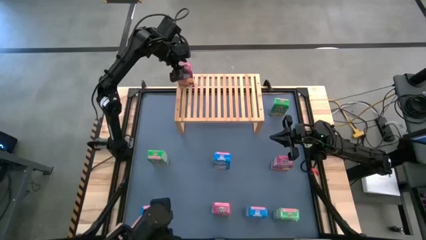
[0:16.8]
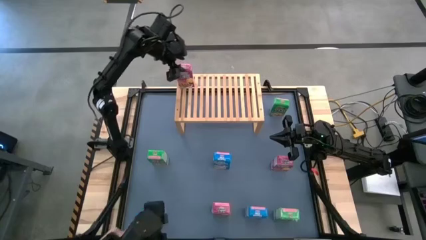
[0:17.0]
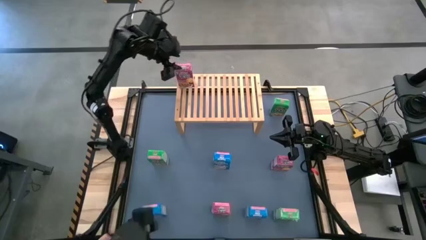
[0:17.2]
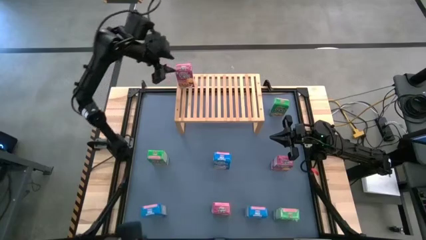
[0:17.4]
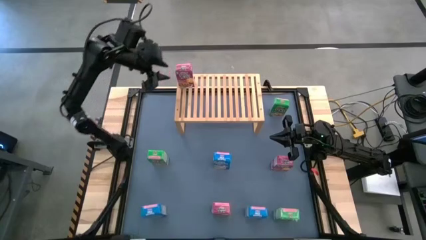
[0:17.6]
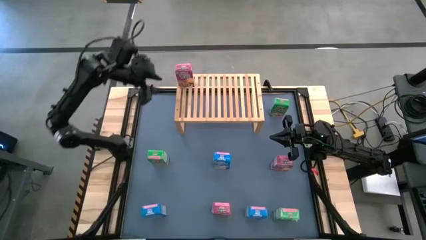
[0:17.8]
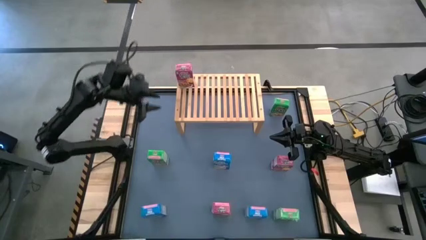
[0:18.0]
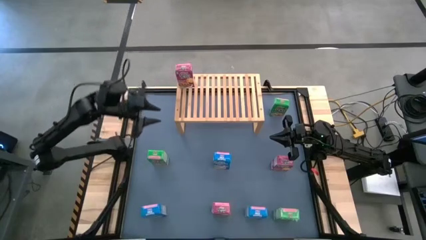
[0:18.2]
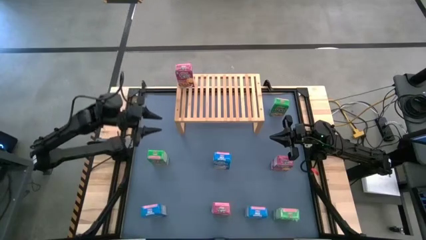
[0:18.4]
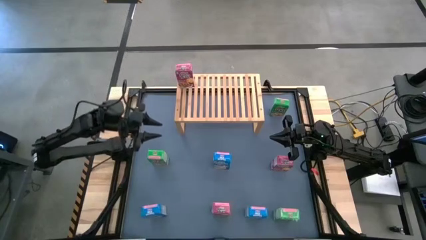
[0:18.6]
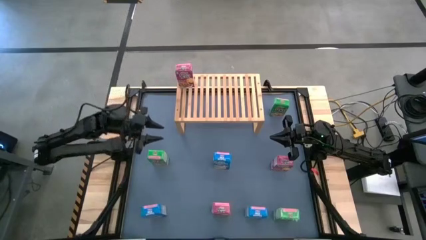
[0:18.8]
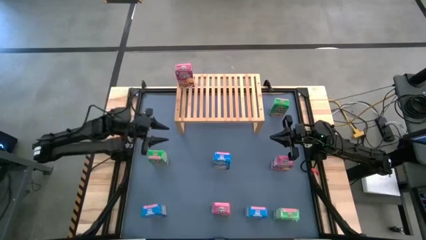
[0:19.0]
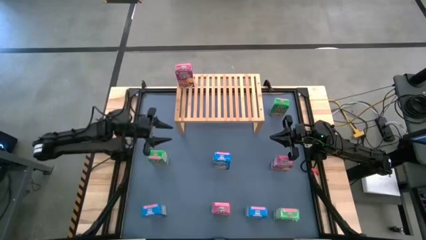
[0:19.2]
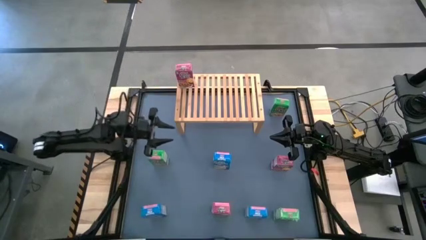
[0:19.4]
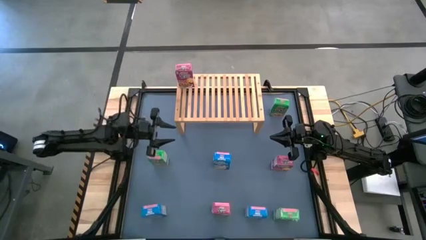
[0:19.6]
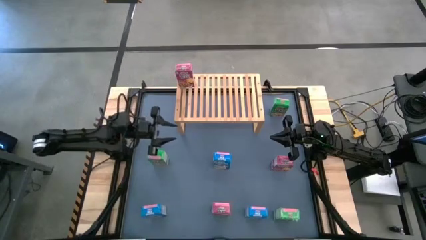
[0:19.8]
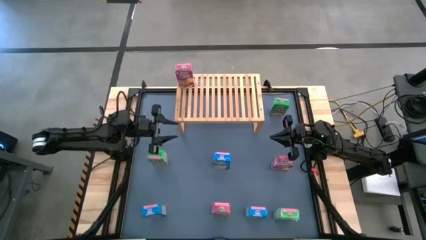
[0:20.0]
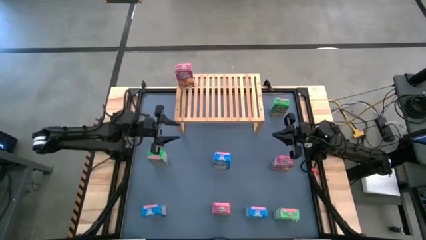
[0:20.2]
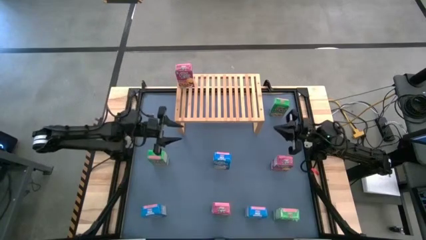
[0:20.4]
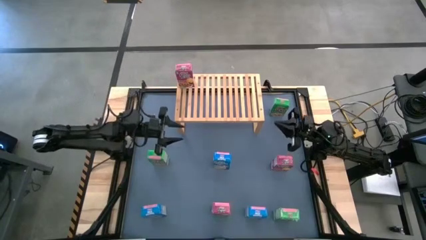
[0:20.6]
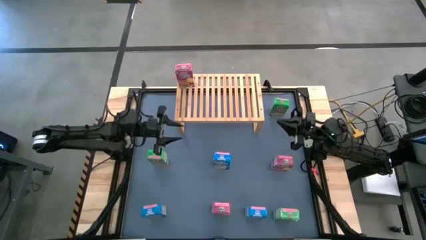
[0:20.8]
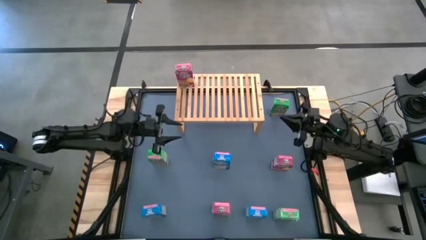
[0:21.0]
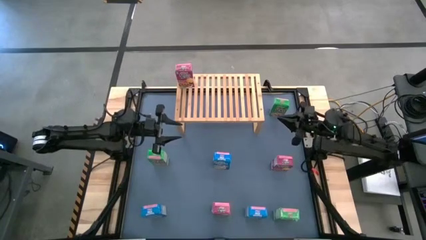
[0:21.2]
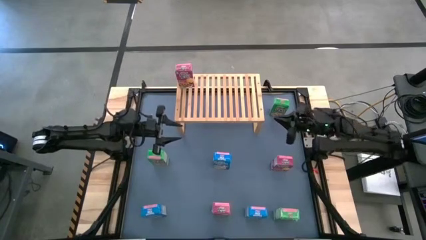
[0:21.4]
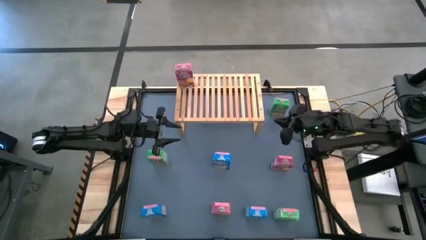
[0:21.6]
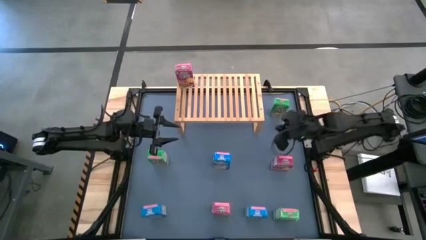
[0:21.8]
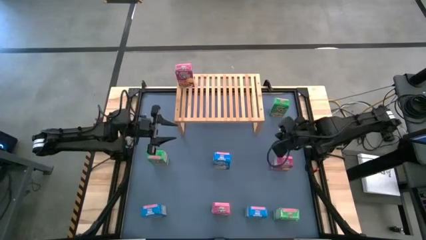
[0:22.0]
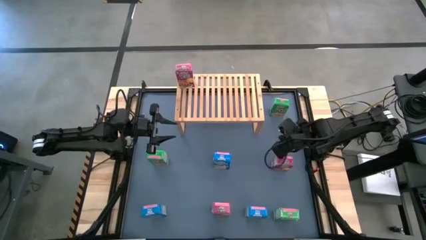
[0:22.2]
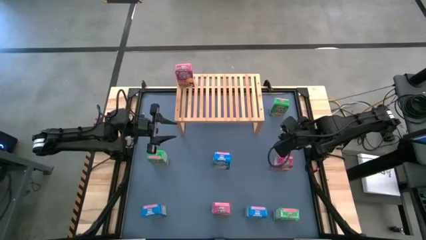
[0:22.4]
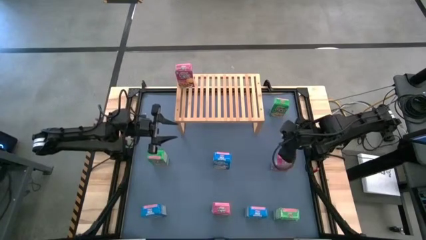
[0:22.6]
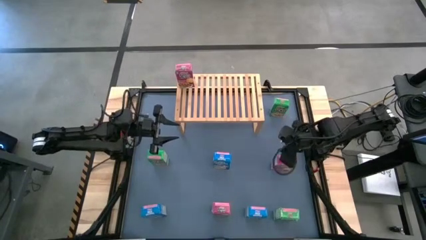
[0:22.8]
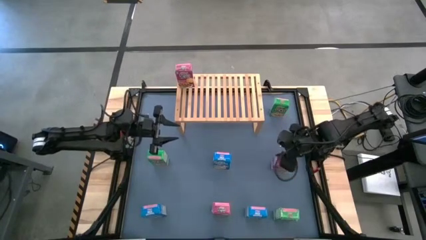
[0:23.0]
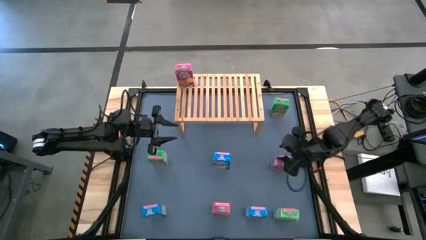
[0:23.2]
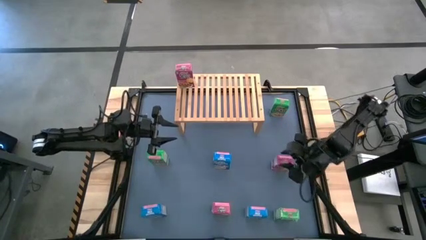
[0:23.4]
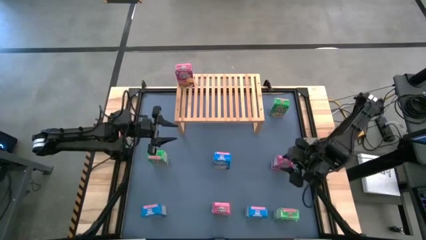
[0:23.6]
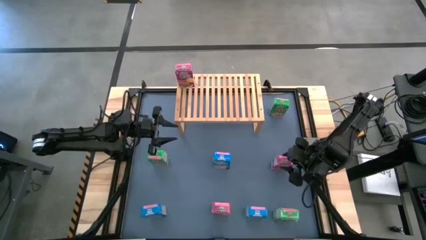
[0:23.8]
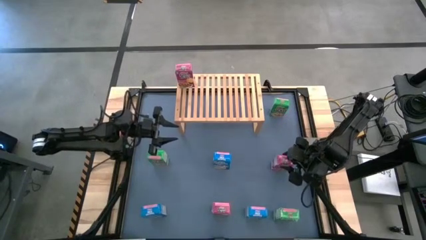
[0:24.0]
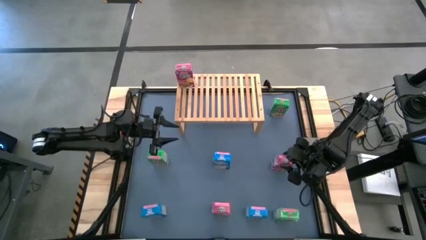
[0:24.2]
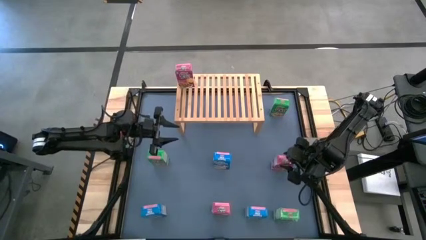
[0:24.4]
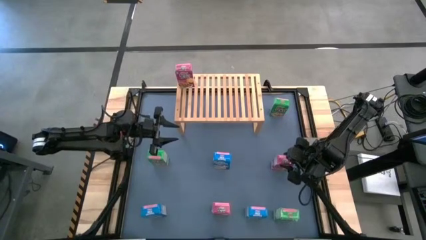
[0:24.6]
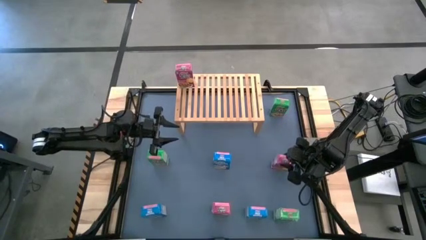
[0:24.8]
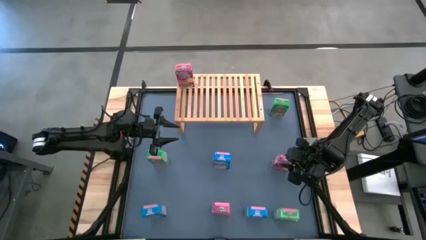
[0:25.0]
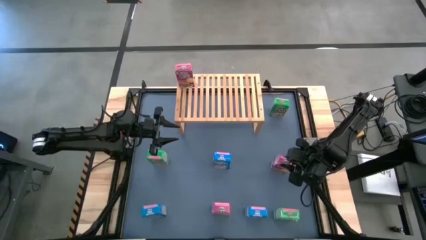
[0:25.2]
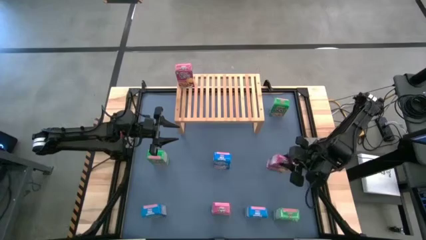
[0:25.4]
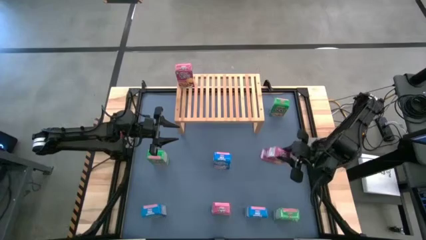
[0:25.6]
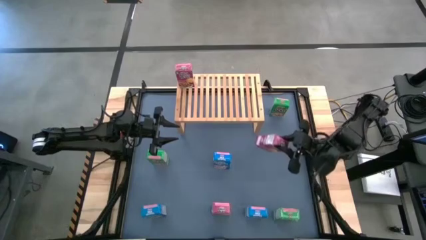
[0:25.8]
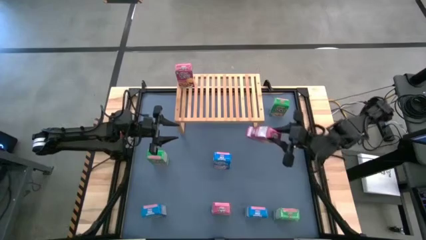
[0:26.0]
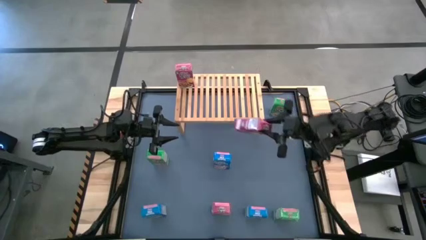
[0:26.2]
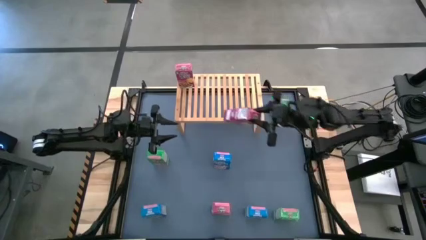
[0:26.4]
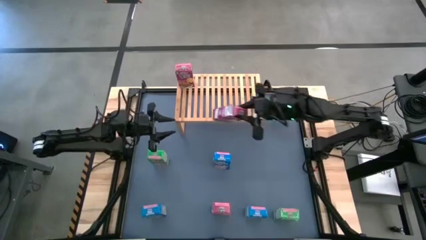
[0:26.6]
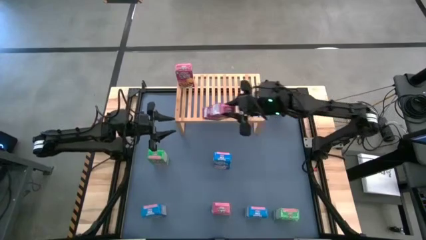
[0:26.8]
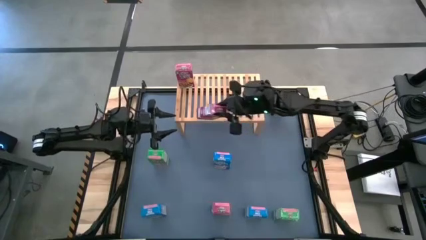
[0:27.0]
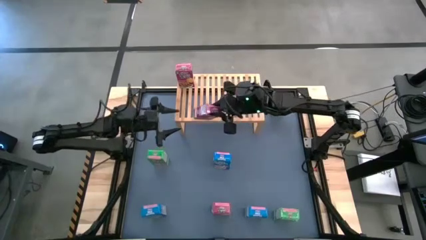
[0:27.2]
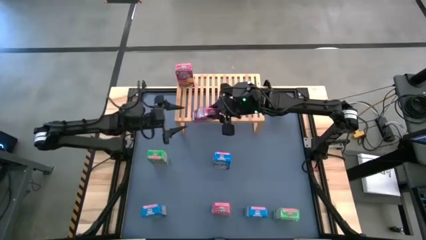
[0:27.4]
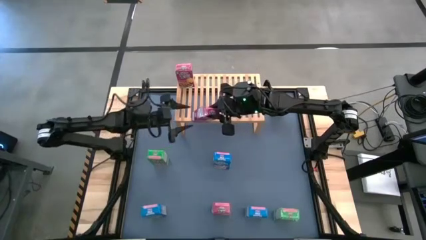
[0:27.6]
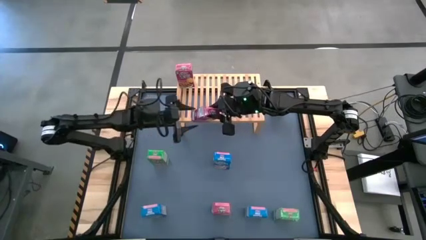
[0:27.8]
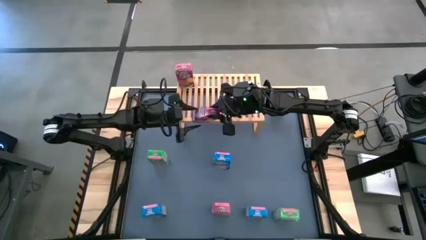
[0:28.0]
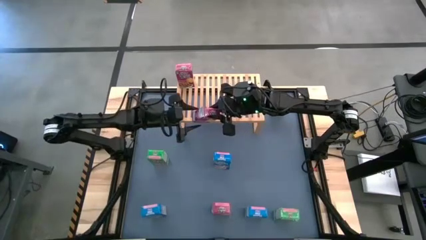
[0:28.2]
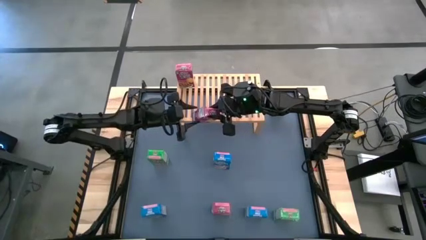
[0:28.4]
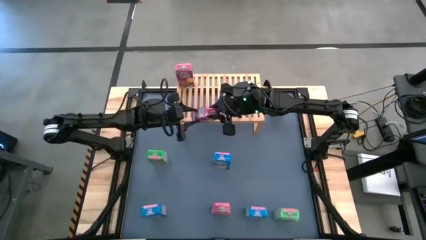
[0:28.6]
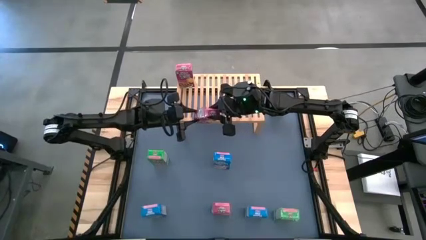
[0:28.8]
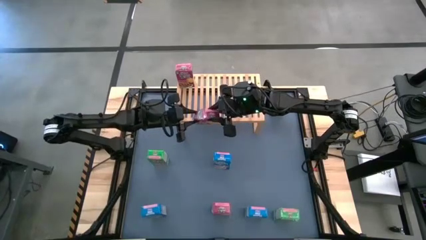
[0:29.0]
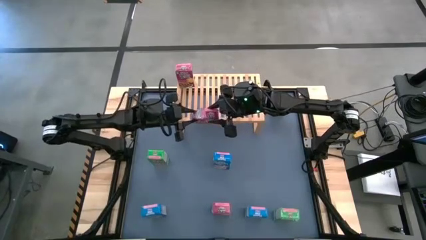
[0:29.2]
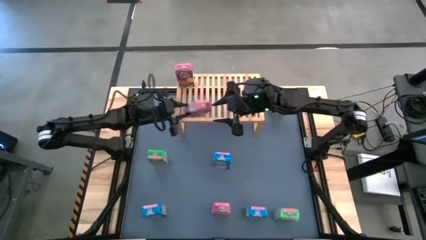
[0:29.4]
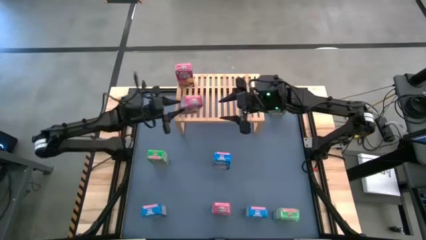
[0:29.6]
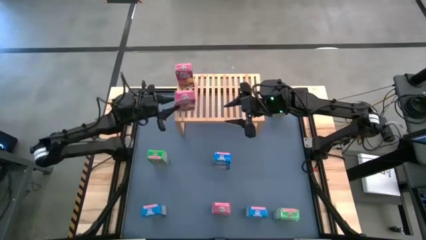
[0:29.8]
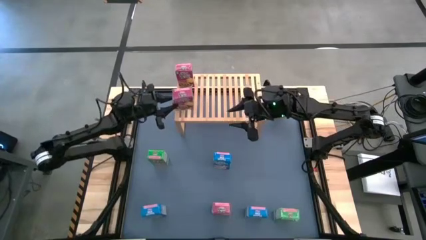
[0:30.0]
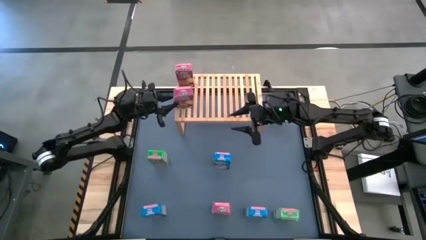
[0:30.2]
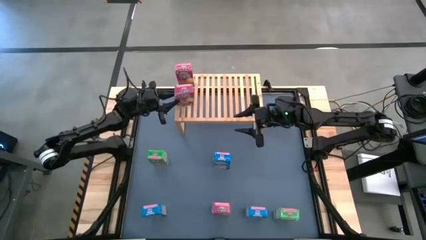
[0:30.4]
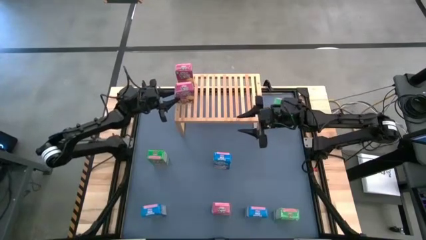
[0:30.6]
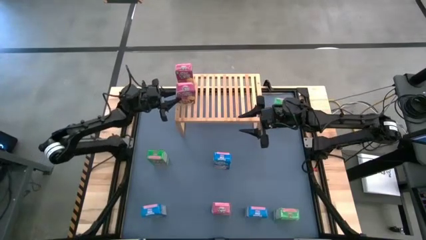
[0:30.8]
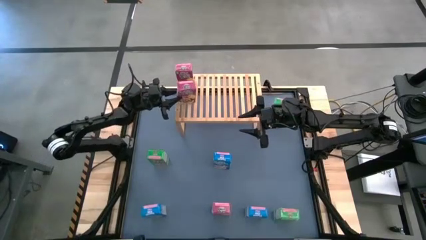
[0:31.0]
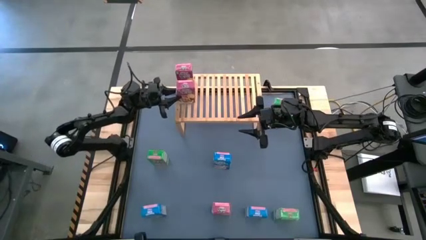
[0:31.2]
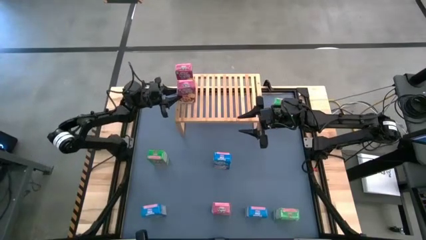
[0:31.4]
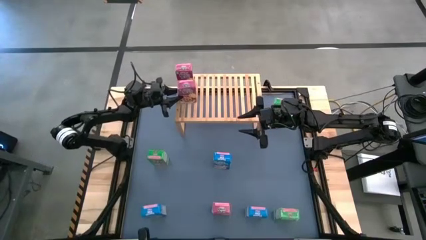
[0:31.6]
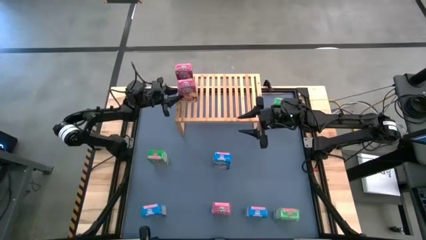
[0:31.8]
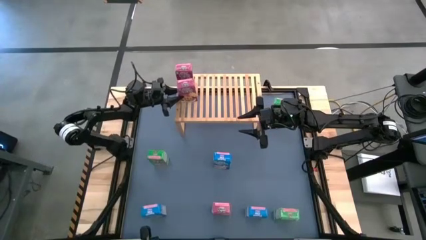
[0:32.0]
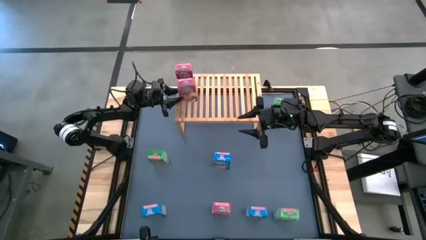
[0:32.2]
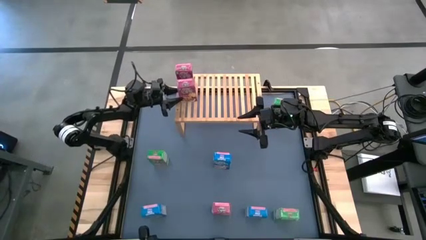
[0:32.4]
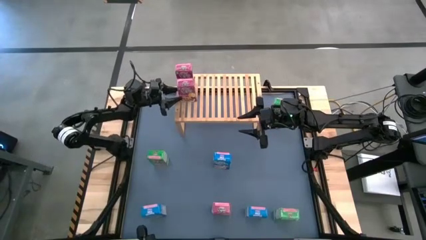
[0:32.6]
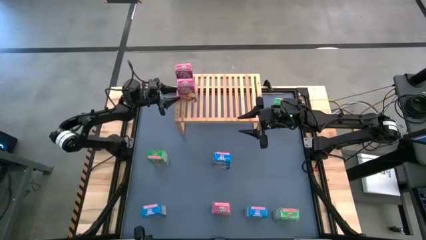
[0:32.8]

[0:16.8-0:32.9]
Task: Stack cereal on shelf
Put the top purple cereal box on the shelf aligned with the other purple cereal box
